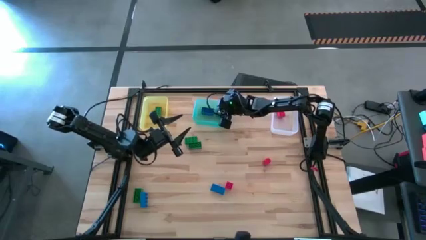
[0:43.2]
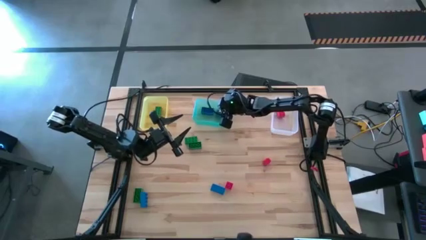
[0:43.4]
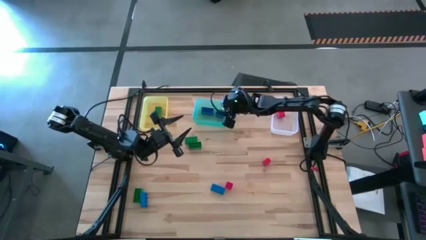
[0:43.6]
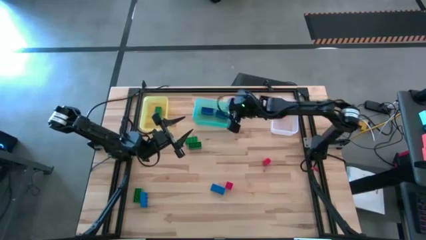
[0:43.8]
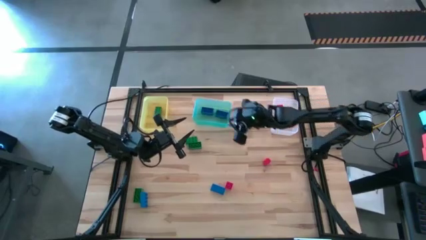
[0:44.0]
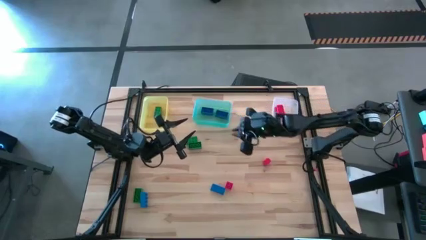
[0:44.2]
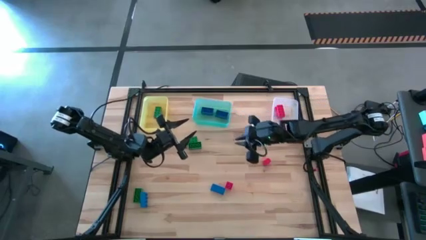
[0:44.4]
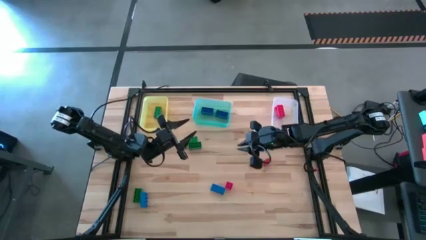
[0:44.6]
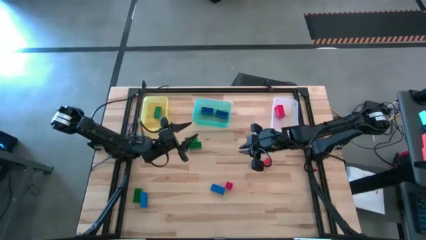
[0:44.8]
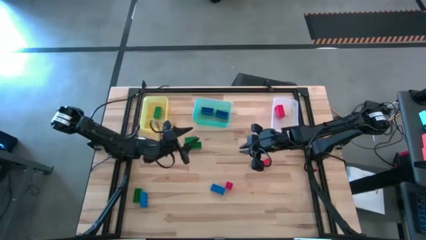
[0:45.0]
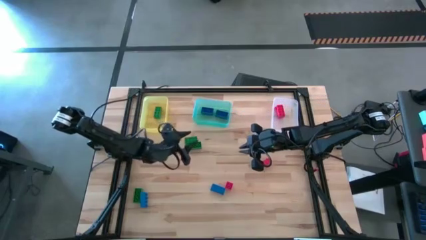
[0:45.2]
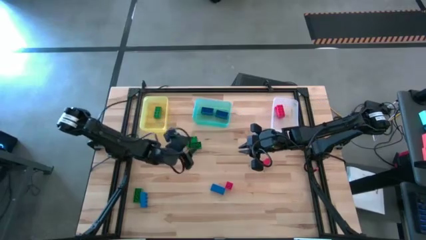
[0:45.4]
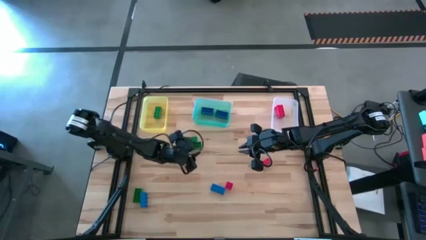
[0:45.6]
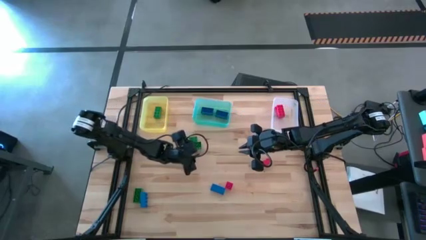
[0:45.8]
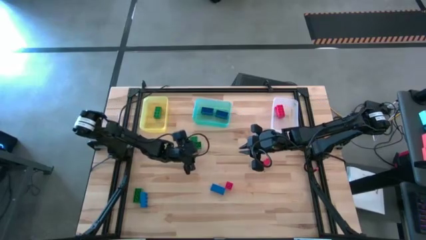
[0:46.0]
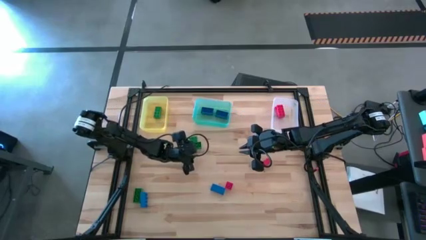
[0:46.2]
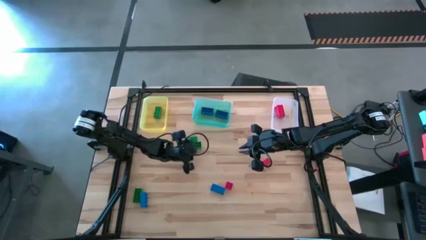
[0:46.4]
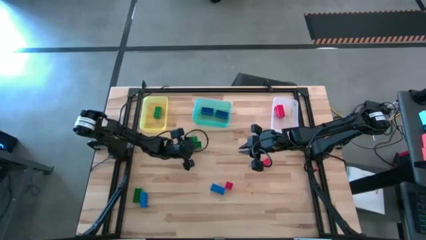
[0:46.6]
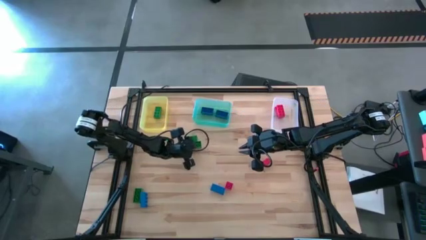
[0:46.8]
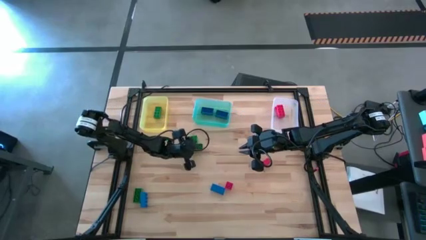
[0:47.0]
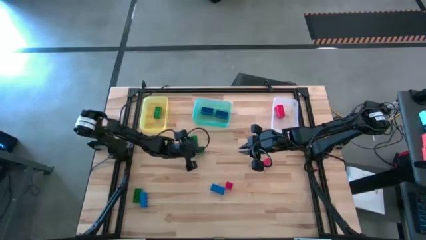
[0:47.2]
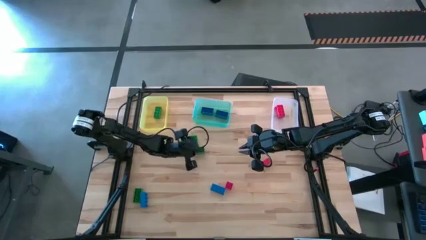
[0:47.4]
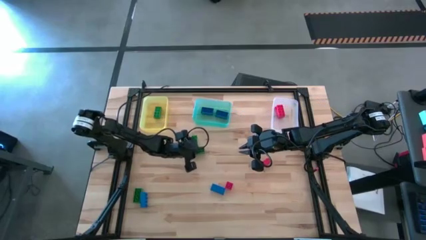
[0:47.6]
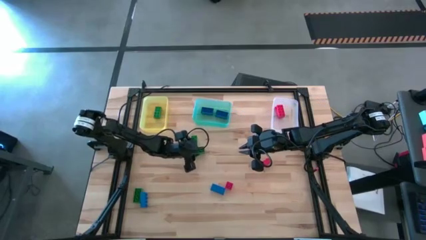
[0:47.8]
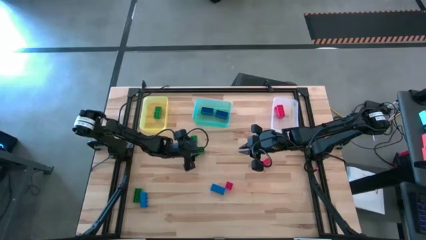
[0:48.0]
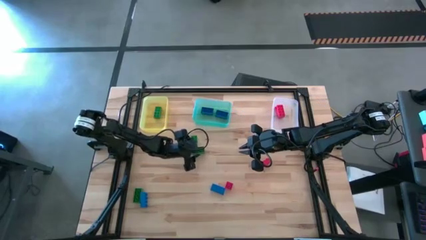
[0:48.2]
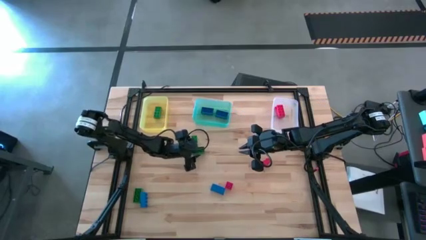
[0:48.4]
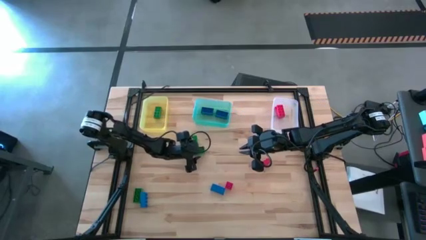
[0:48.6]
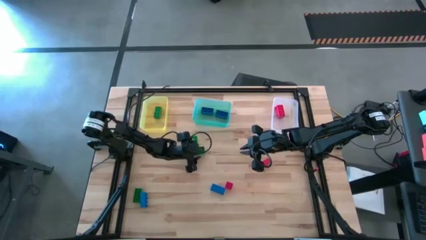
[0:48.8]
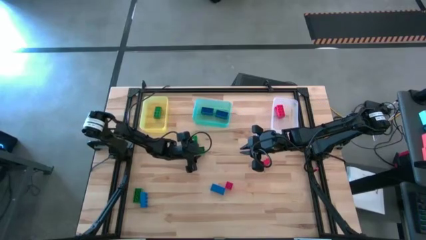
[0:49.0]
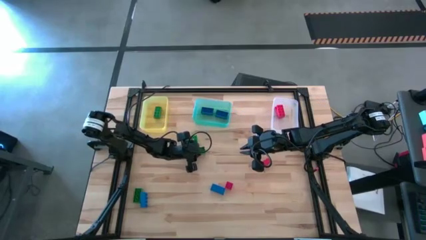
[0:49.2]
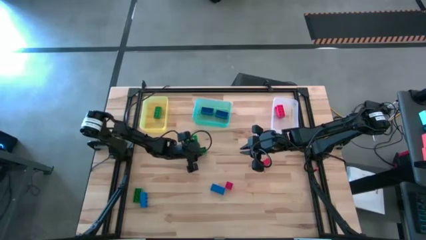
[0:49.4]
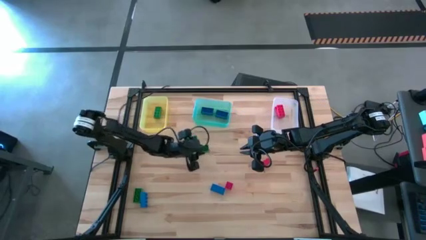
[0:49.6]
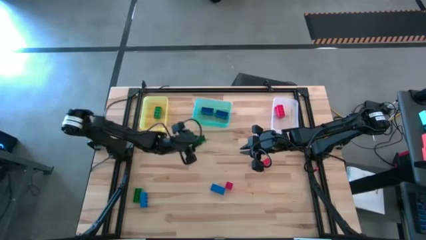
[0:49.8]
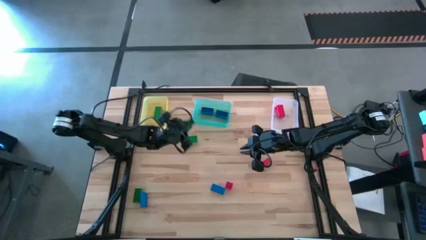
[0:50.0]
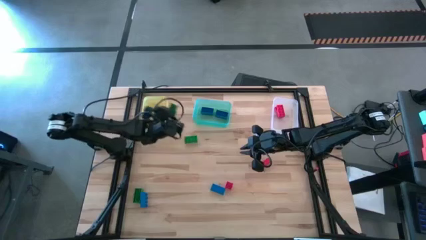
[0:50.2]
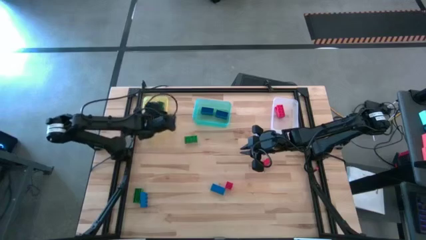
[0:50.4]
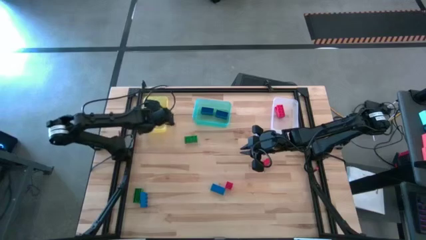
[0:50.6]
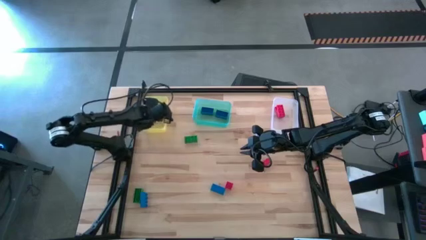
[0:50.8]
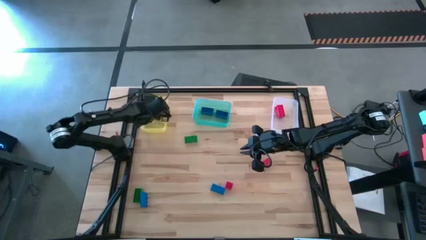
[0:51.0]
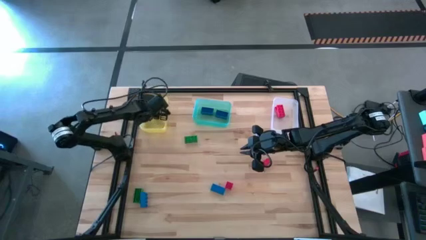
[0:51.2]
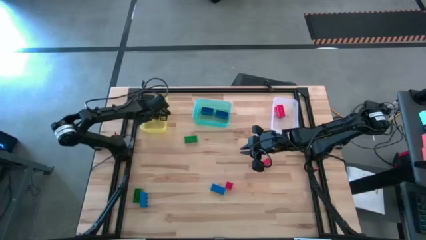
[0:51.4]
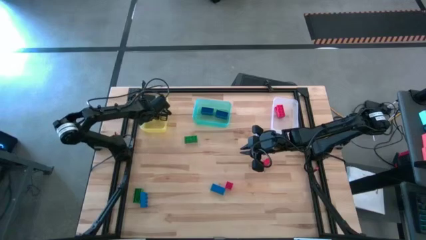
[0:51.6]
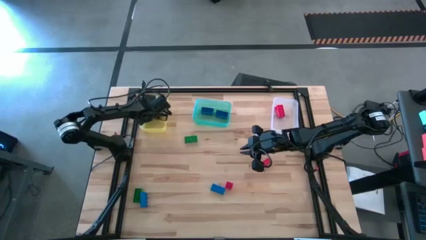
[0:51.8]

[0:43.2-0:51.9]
Task: Sort & place blocks by color
Put the green game piece into the yellow bin

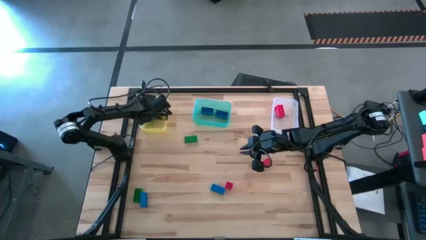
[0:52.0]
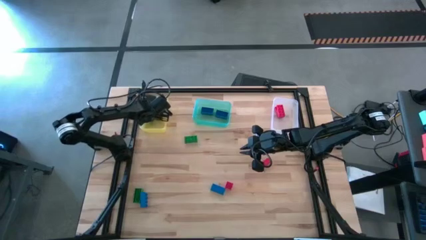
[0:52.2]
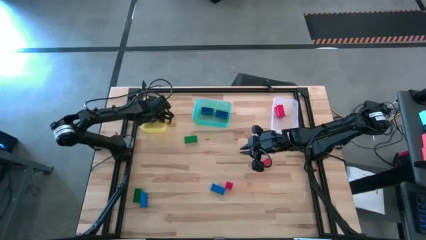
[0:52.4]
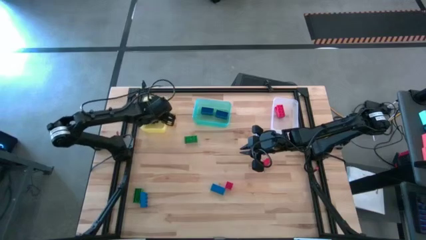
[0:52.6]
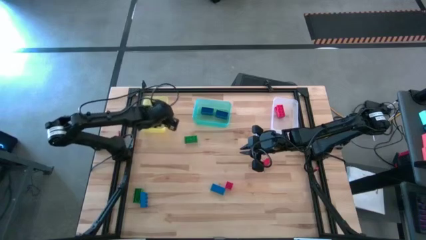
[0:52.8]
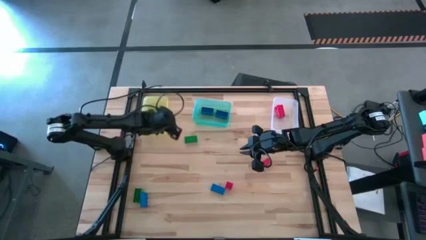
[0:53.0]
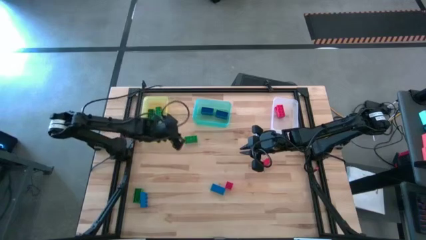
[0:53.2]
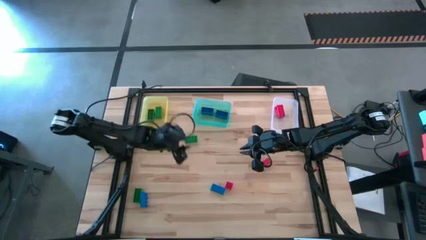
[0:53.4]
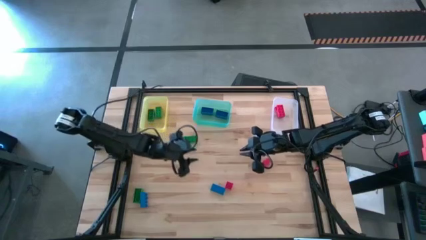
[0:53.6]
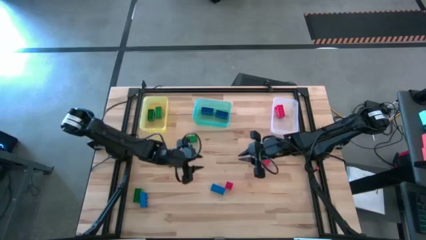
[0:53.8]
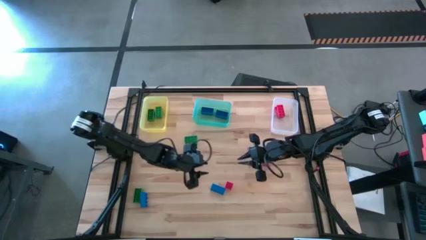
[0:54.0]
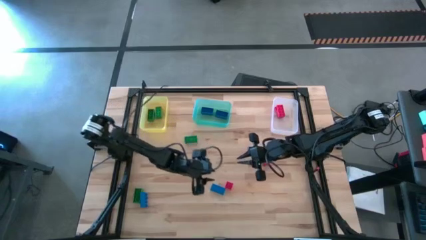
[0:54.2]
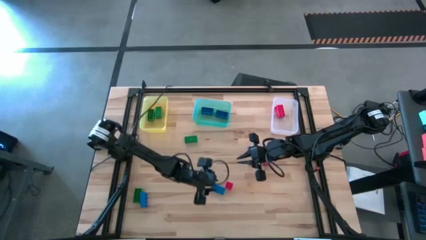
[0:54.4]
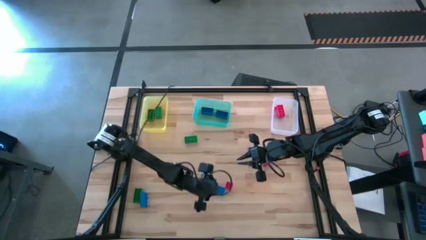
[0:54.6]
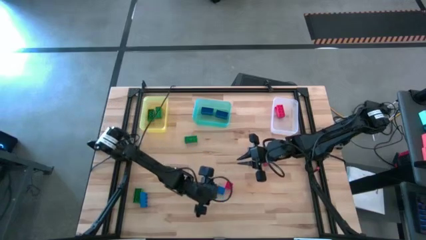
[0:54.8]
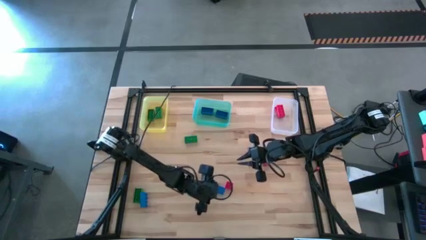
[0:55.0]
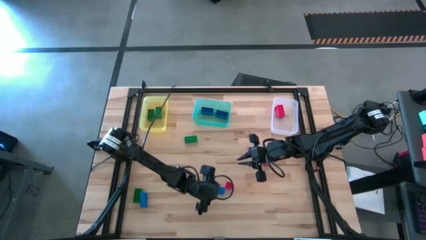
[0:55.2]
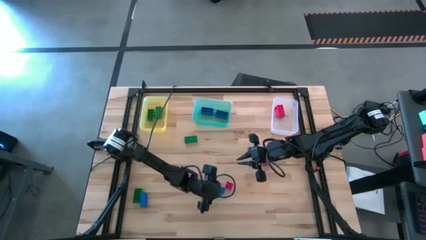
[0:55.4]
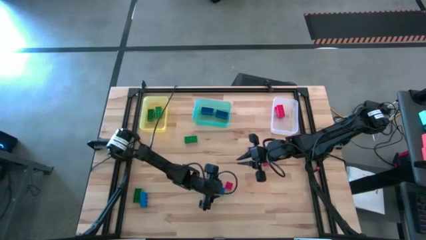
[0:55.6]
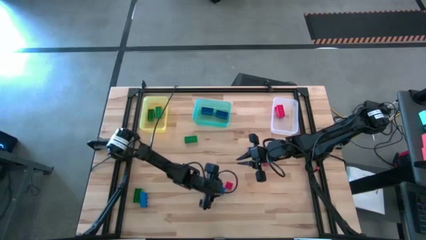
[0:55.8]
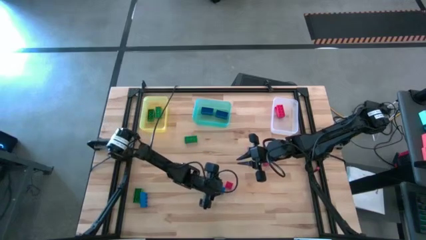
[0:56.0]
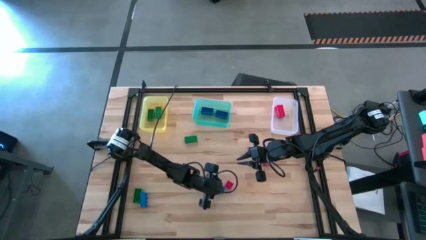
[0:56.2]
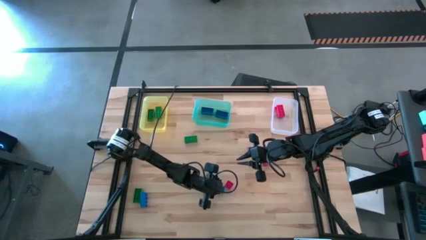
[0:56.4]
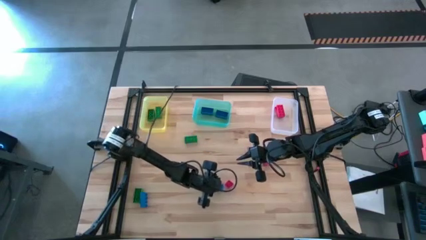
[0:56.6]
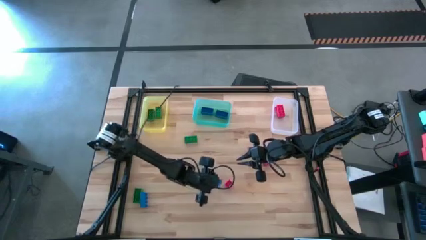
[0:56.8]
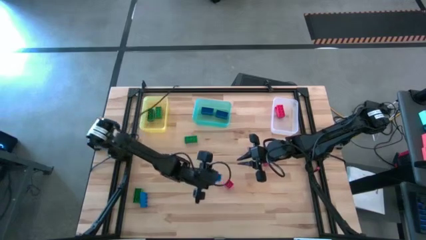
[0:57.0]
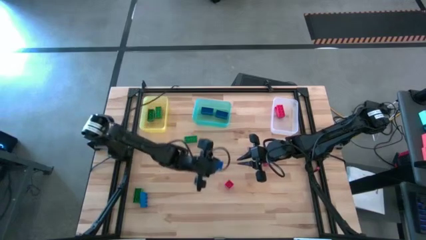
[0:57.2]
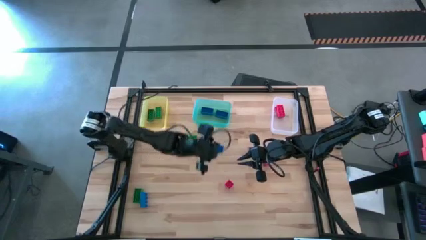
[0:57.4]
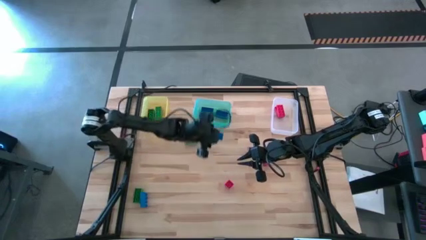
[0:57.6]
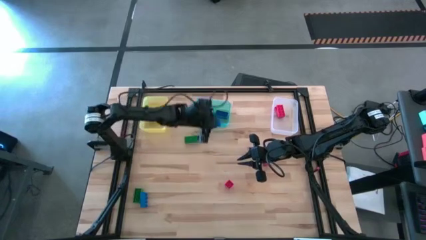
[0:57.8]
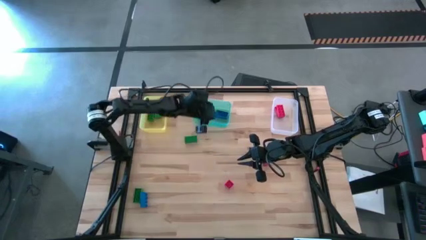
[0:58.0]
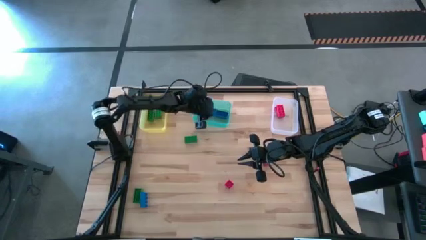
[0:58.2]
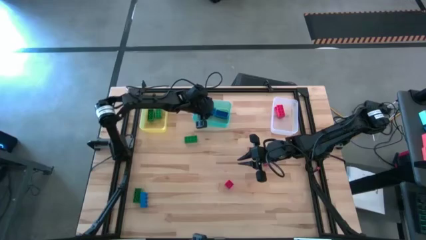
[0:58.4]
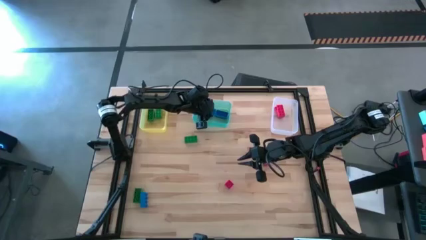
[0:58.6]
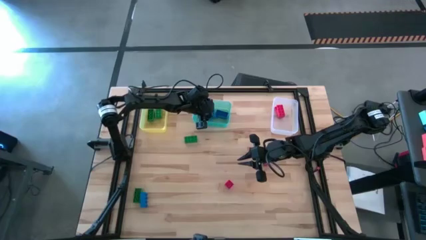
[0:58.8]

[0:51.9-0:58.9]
Put the blue game piece into the green bin
